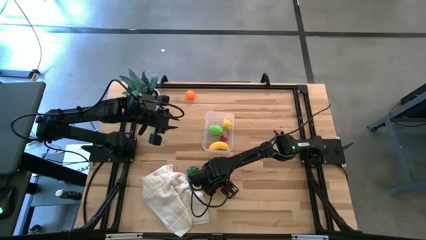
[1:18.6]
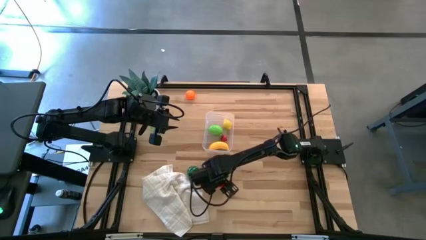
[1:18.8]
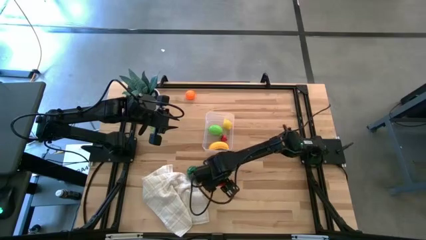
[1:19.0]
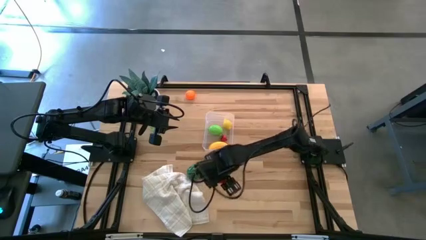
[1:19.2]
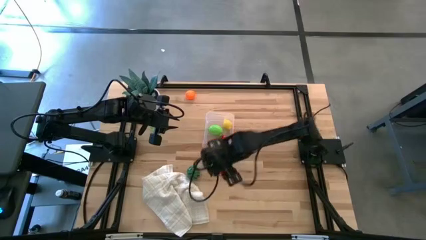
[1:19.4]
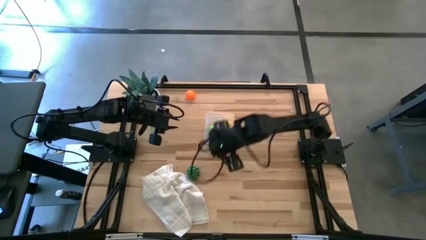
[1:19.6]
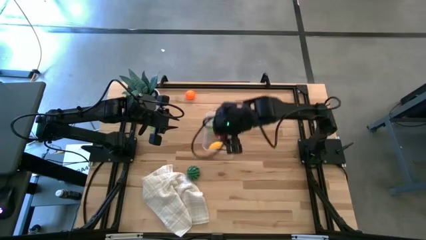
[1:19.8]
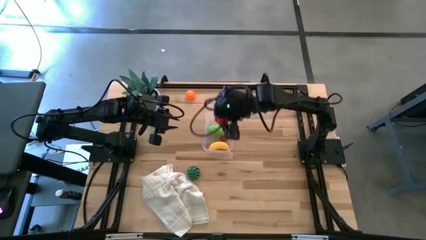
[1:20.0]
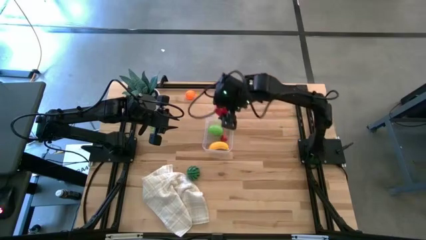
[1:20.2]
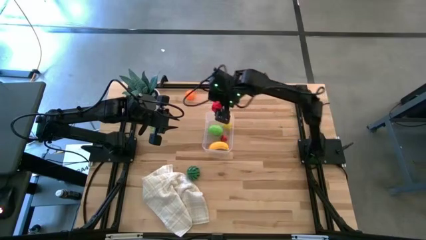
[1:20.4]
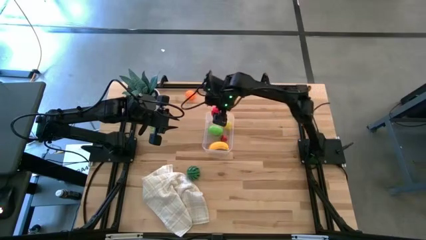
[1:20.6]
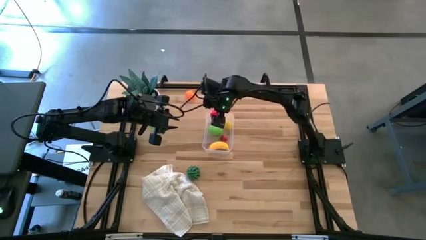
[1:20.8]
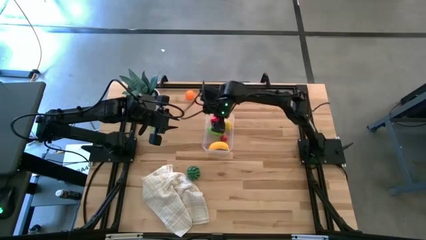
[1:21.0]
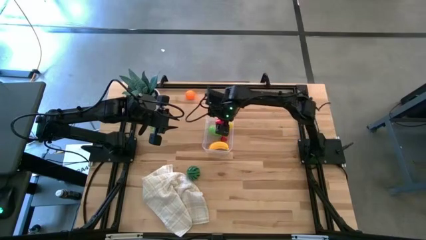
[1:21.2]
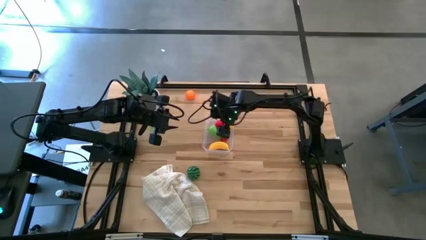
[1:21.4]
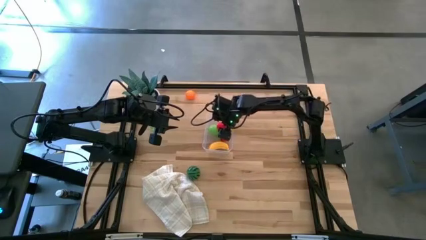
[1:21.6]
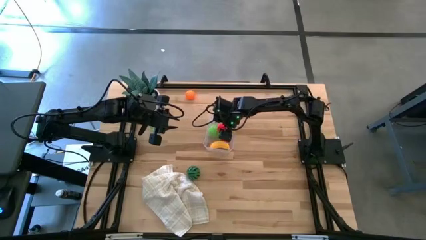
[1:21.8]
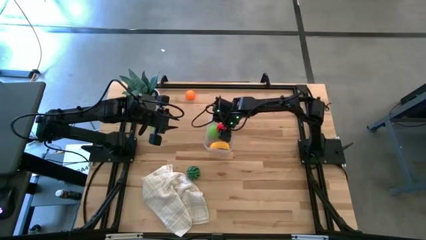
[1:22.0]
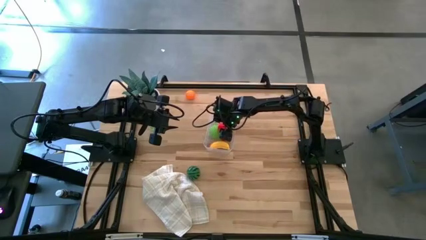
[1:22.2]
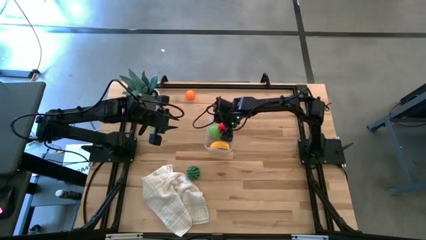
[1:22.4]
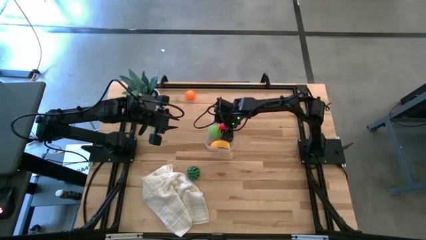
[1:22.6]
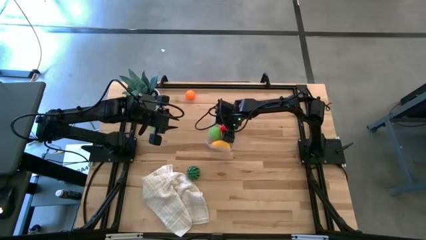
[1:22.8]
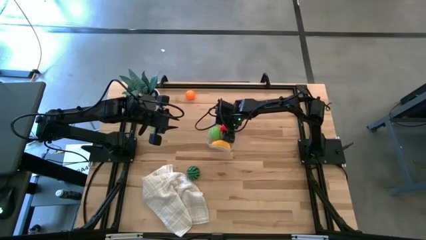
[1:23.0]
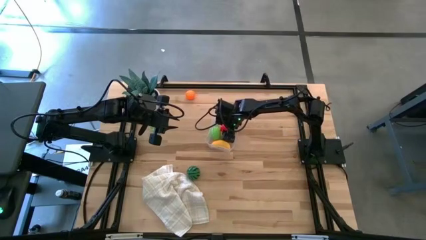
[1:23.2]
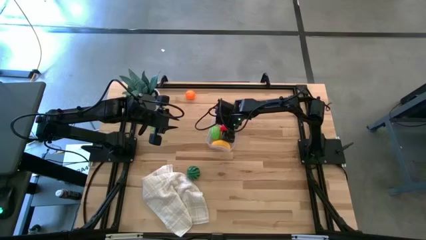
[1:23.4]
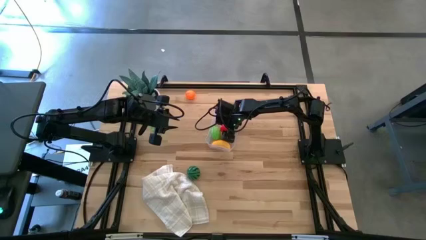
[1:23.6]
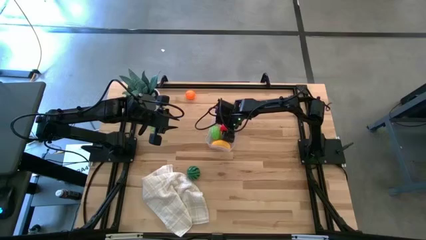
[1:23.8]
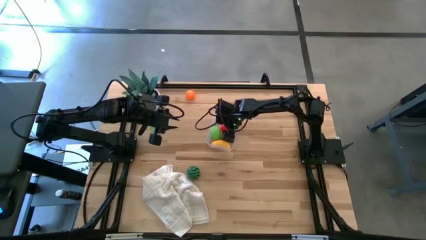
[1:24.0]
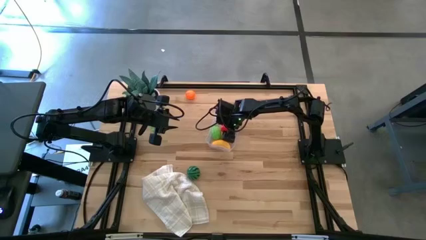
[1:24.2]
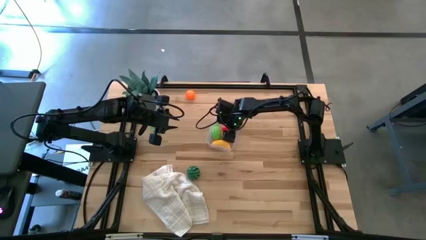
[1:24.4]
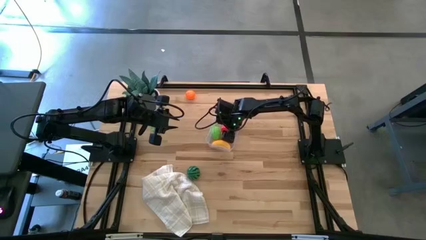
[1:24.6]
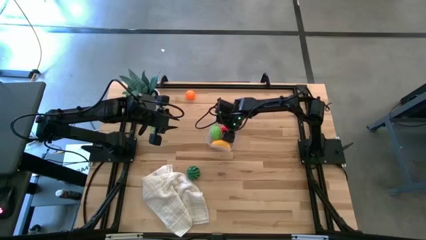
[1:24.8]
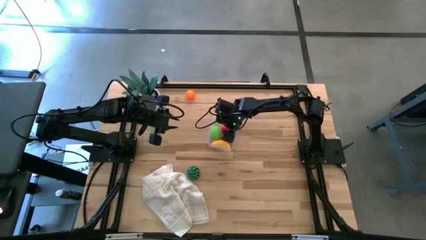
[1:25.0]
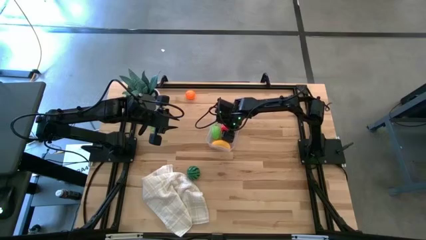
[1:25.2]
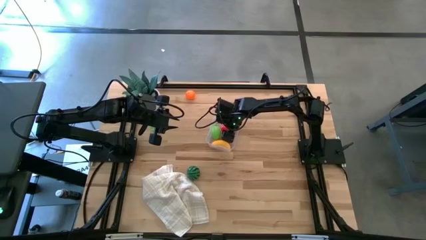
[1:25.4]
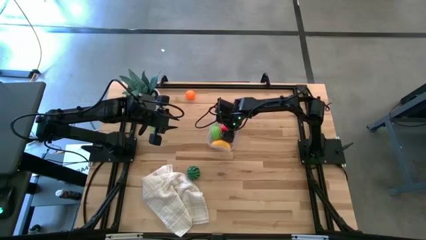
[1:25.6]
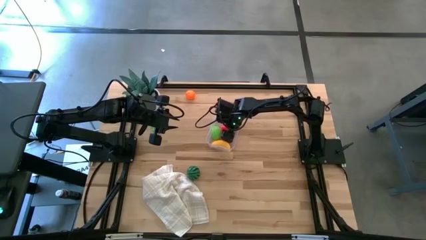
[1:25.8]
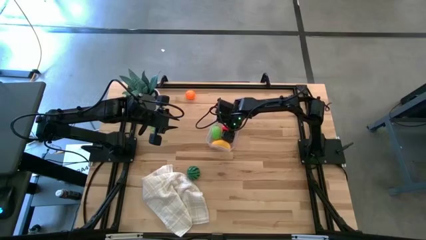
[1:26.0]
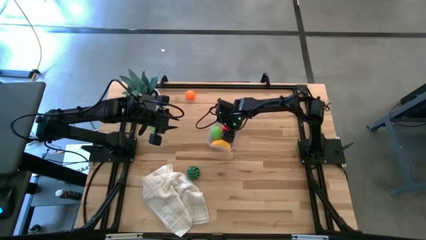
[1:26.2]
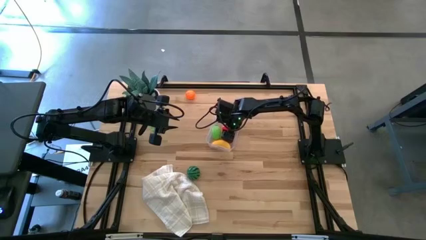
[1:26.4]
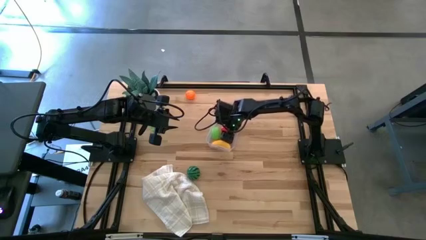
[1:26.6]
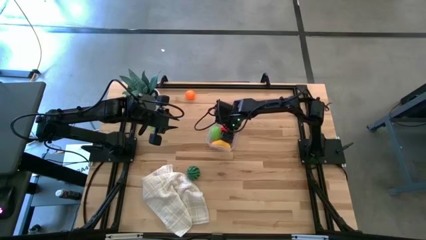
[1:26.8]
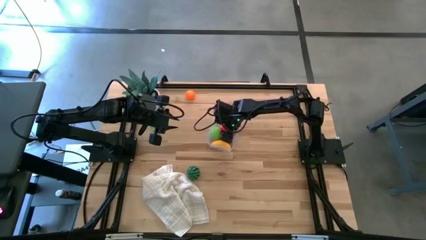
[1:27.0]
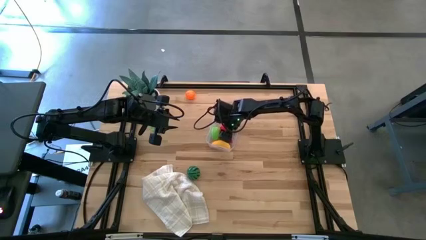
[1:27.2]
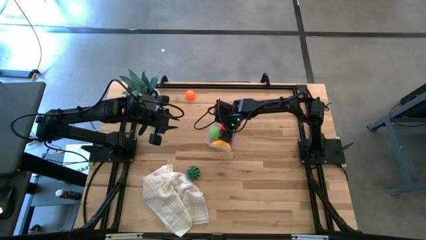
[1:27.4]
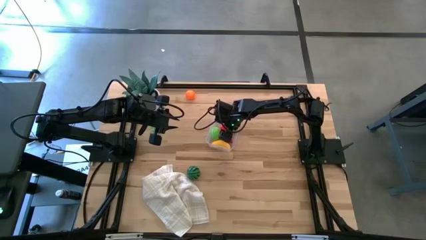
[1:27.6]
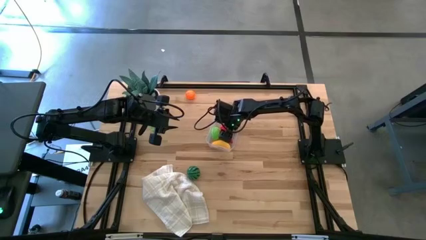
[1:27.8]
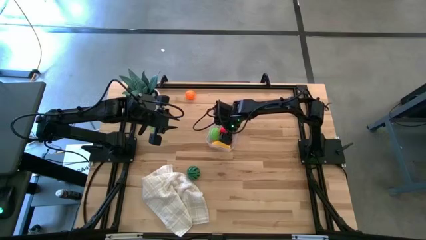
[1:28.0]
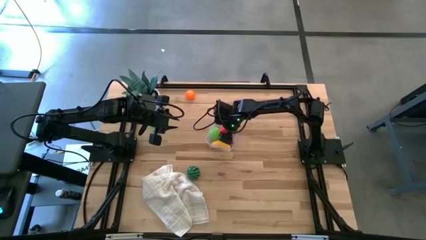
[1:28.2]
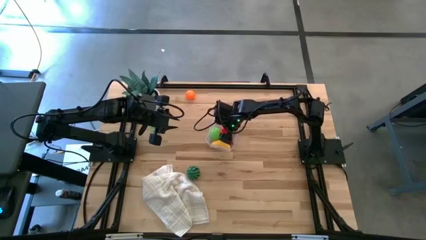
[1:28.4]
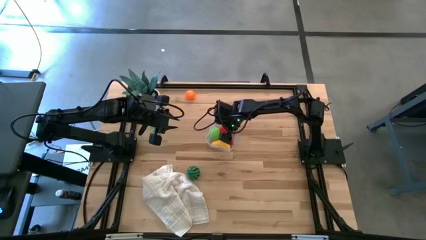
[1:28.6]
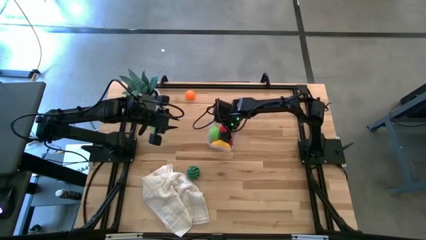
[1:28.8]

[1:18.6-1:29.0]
Task: Pick and placing Produce into tupperware
Put the red apple into the transparent bin
